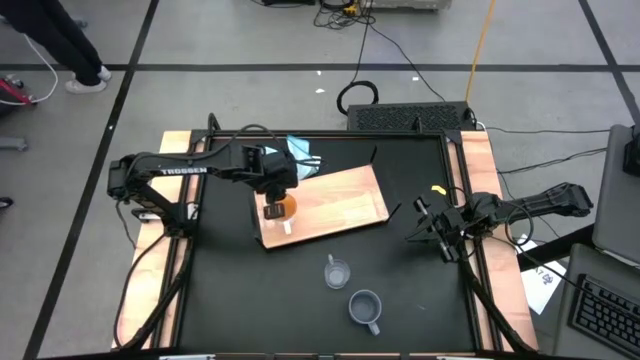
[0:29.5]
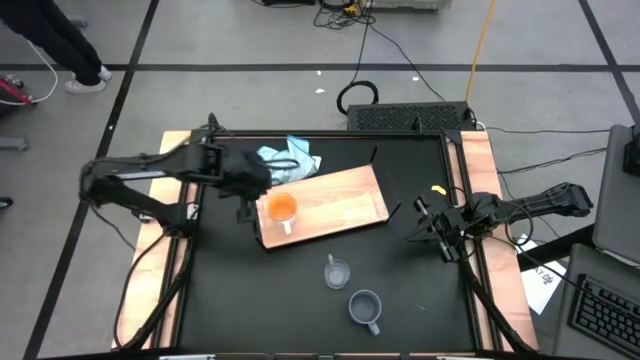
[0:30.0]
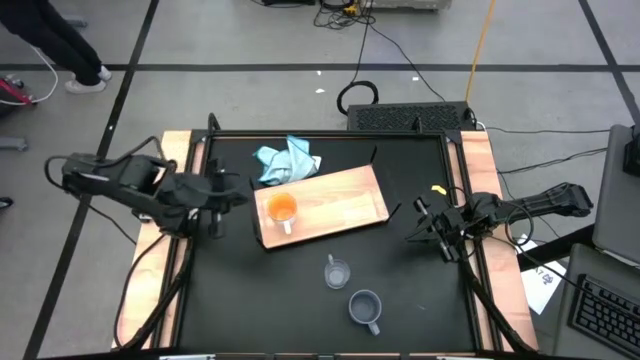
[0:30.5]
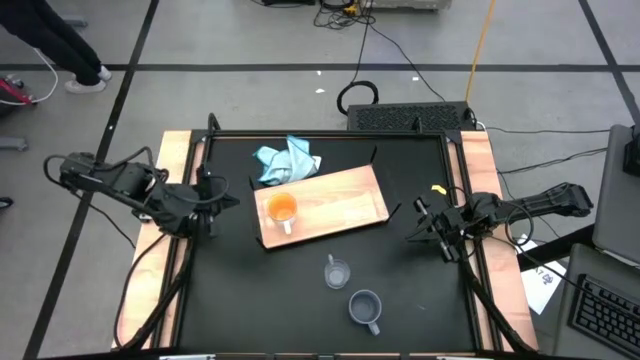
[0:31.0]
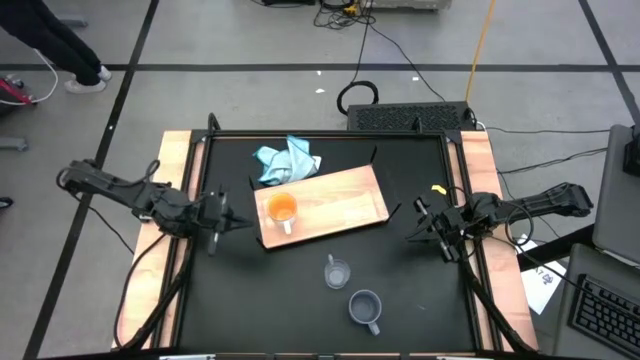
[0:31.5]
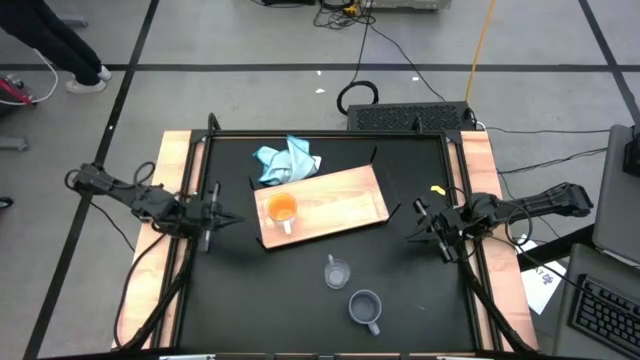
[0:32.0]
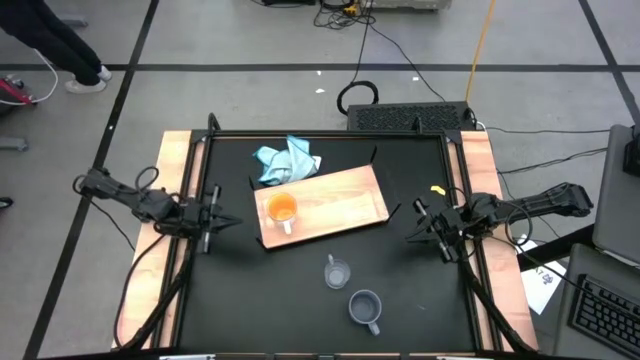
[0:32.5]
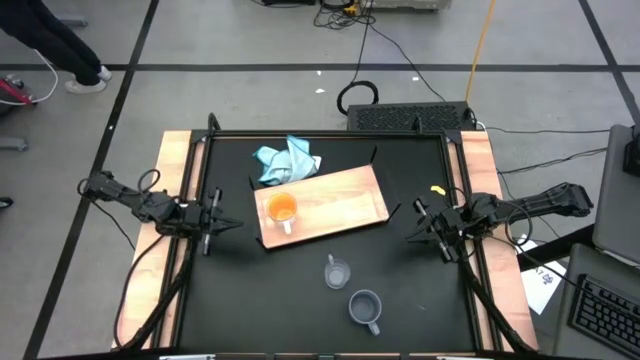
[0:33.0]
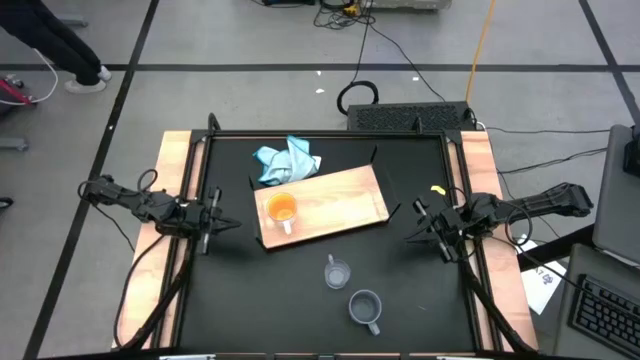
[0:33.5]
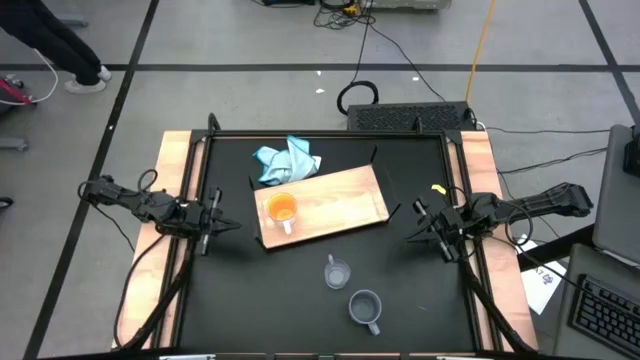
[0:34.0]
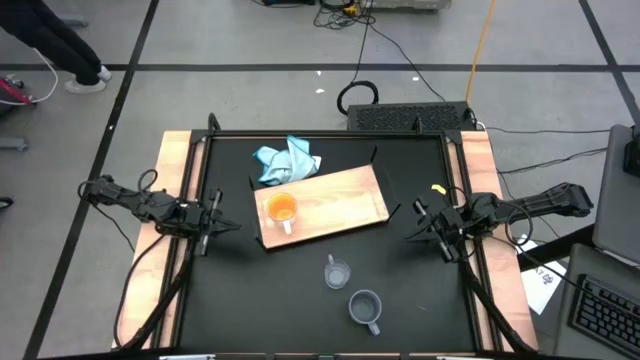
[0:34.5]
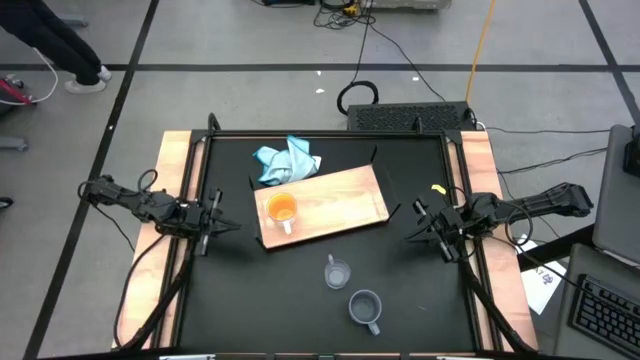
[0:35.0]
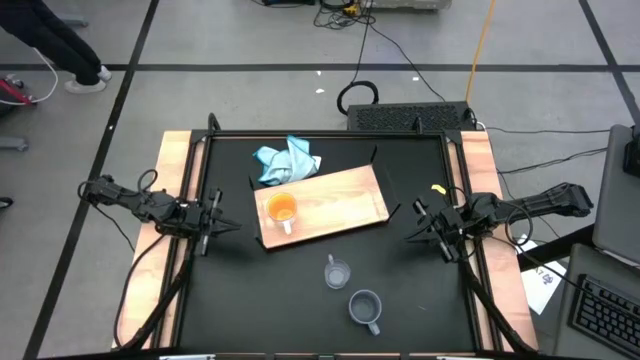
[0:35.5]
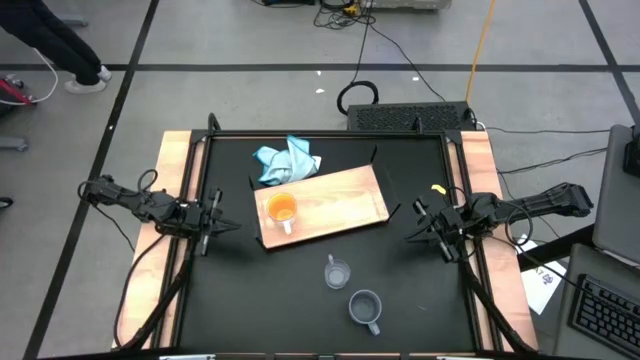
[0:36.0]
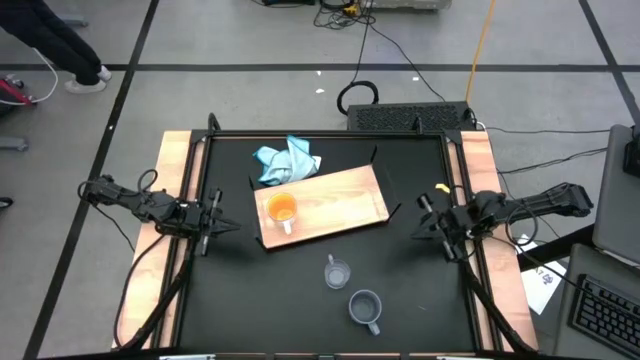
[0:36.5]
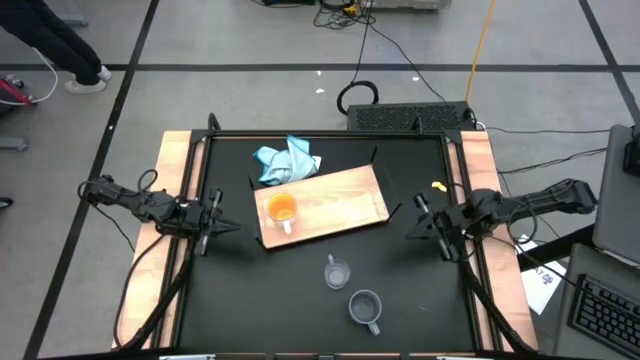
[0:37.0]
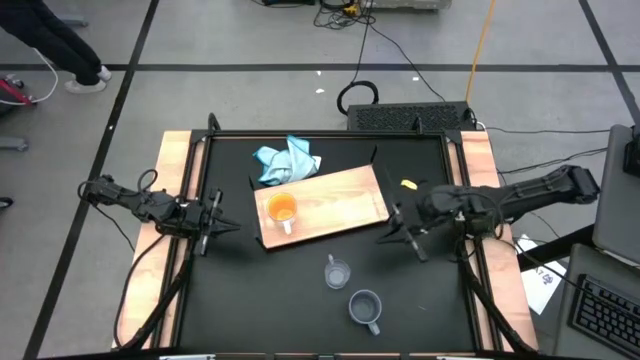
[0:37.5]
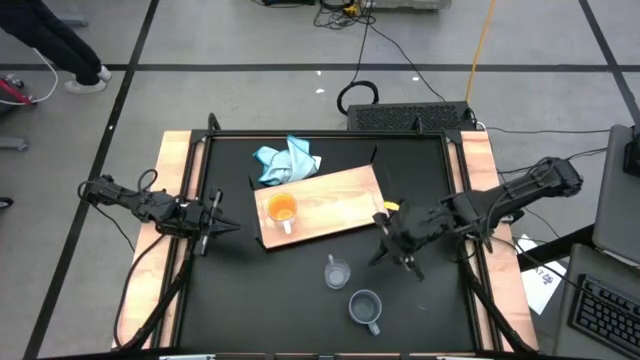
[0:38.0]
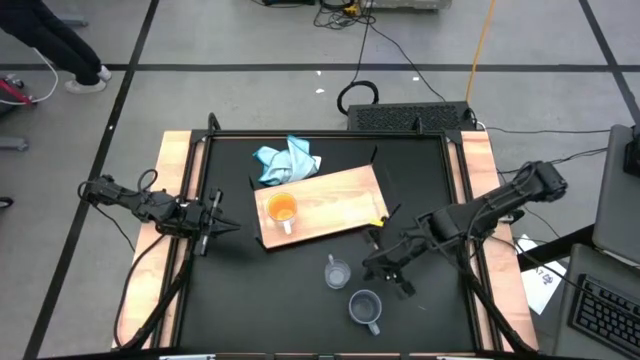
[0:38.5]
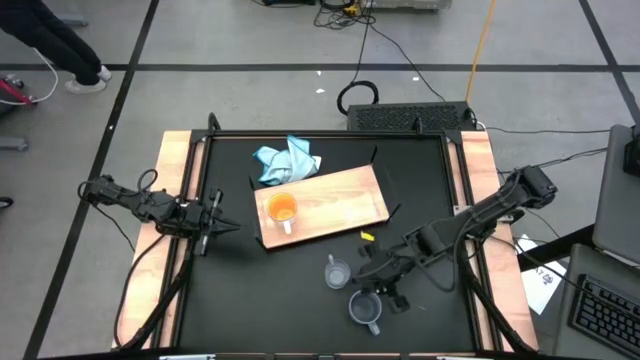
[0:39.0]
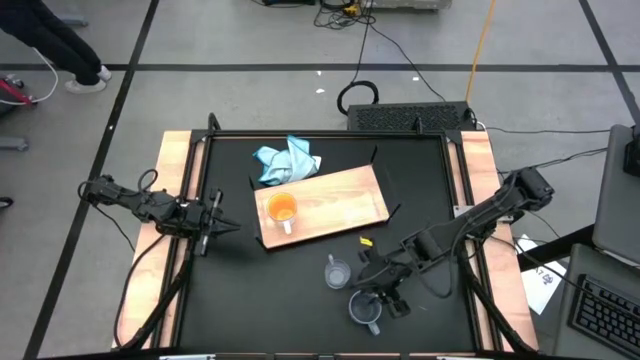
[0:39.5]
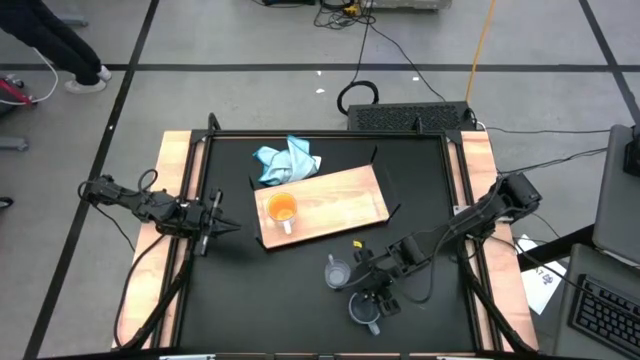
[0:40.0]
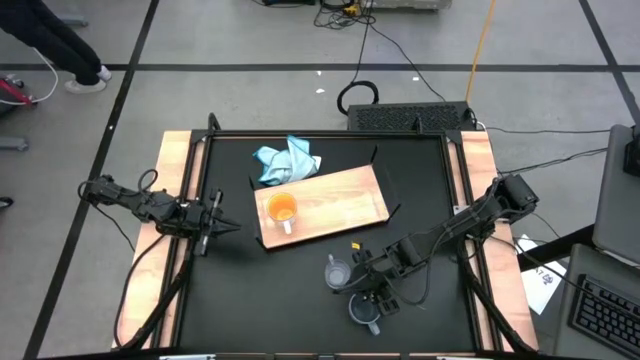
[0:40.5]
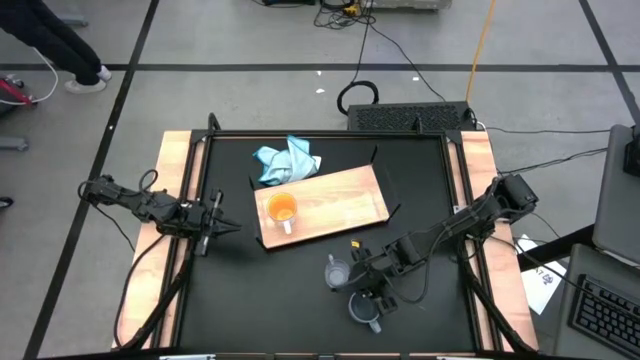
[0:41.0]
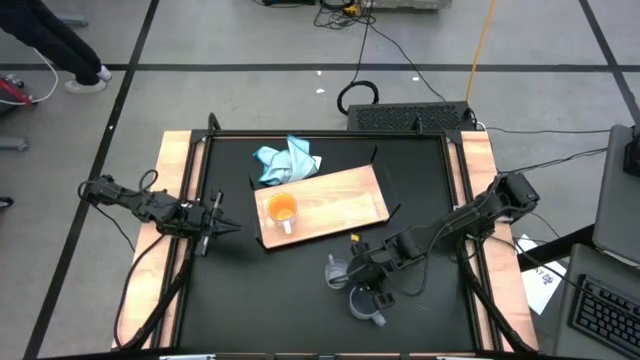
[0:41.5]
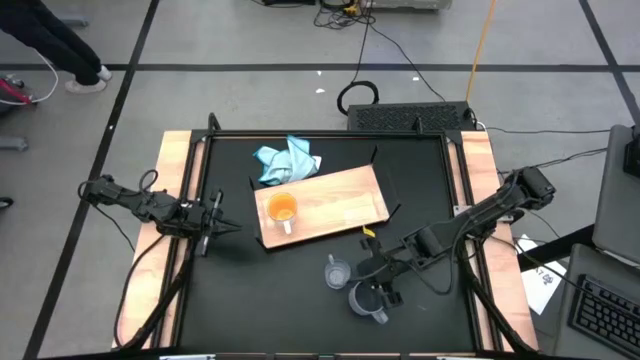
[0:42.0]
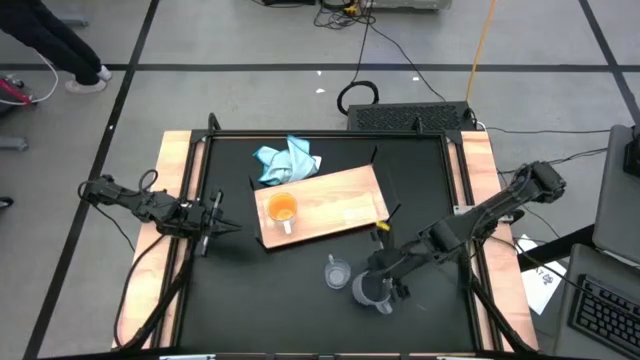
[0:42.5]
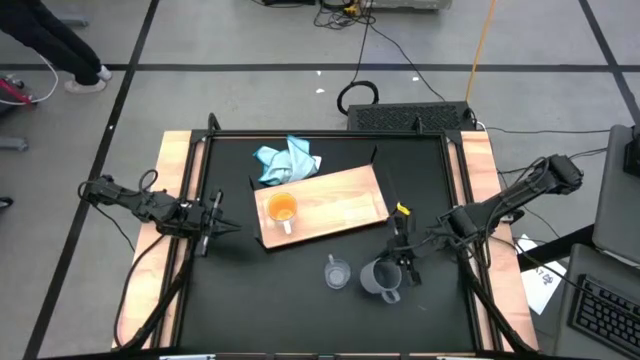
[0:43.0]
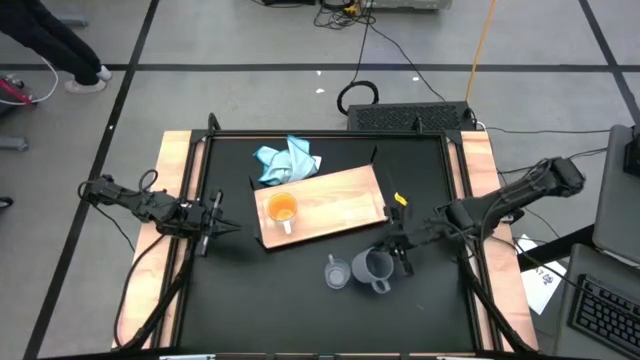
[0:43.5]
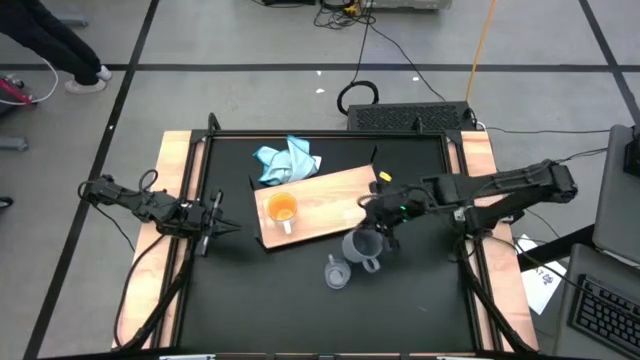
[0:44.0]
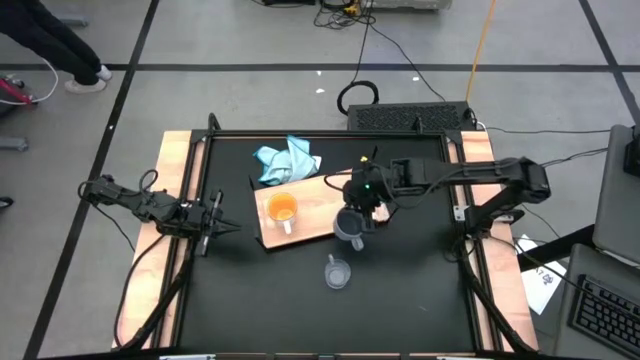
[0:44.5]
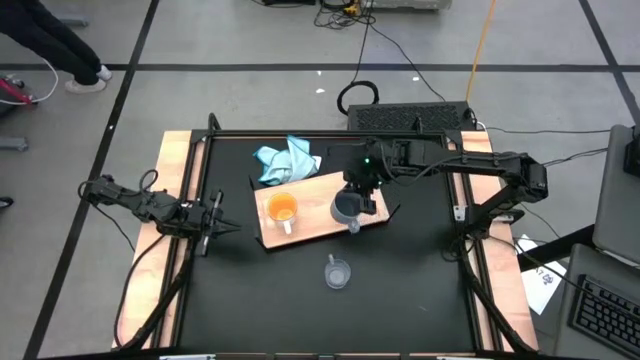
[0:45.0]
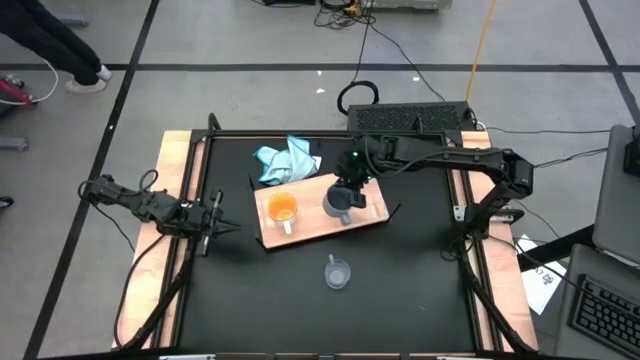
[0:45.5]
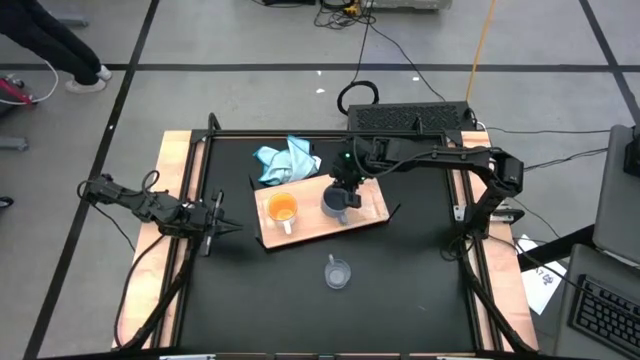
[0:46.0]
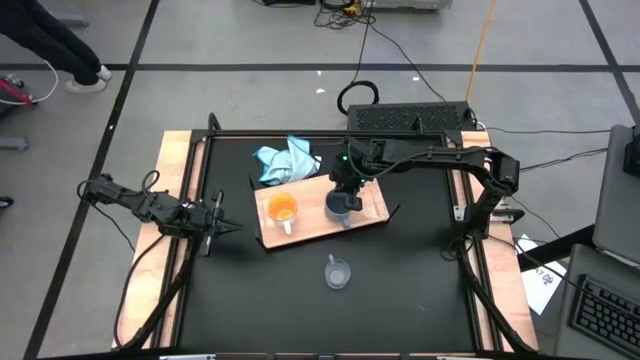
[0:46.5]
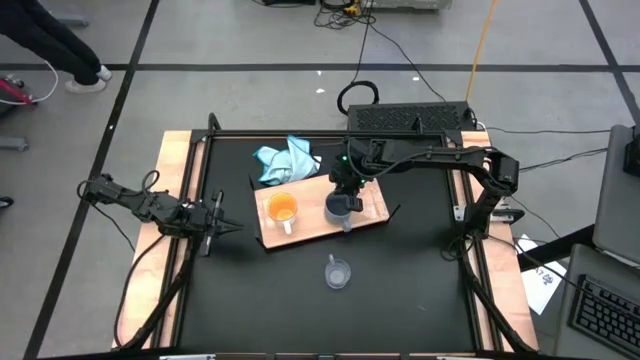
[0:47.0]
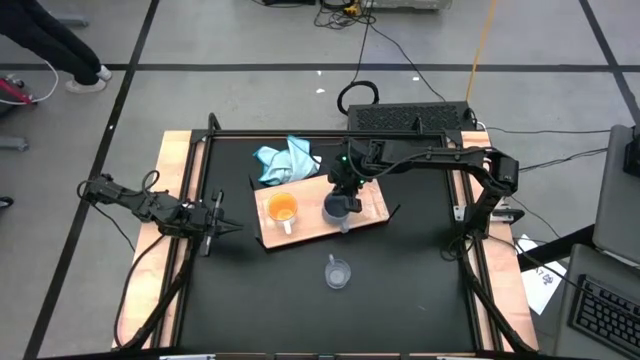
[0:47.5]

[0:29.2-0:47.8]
Task: Stack small to large cups/mugs on shelf
Put the gray mug on the shelf
